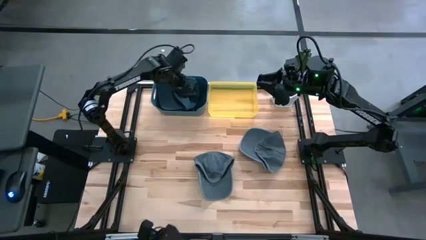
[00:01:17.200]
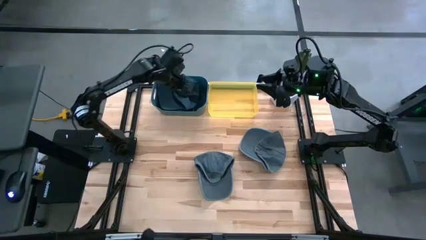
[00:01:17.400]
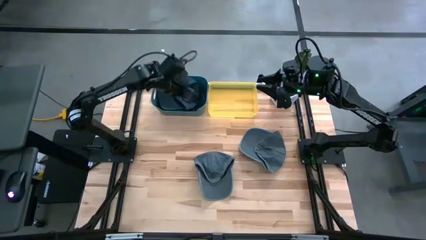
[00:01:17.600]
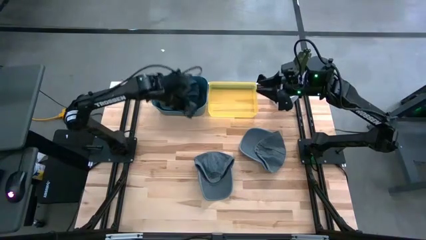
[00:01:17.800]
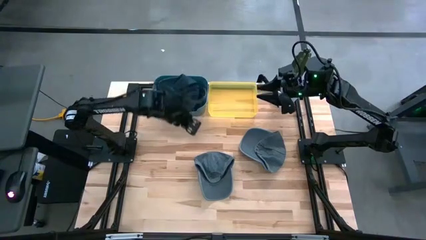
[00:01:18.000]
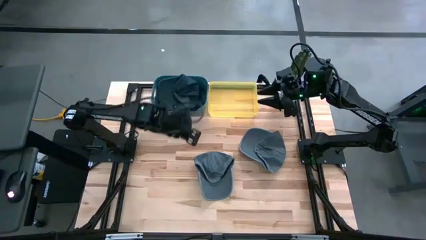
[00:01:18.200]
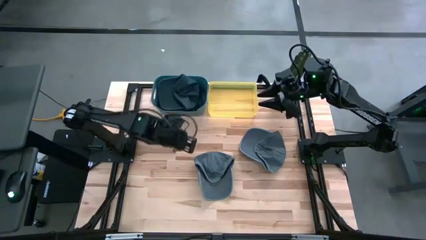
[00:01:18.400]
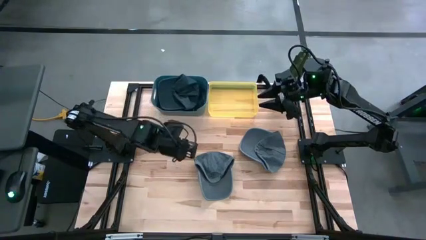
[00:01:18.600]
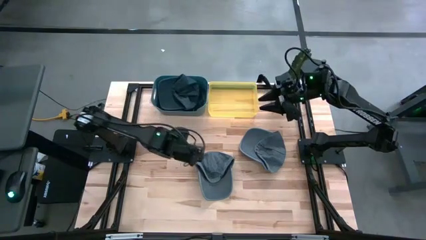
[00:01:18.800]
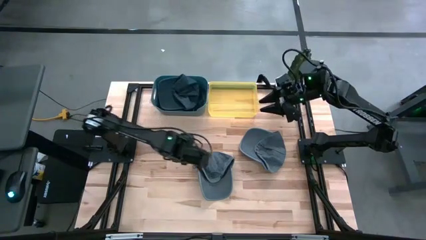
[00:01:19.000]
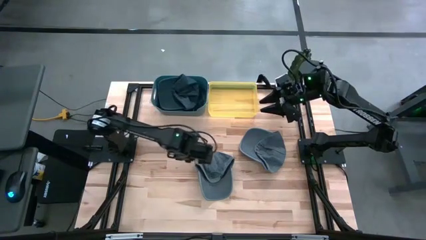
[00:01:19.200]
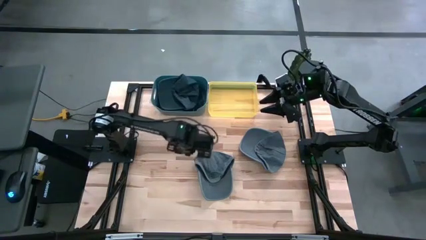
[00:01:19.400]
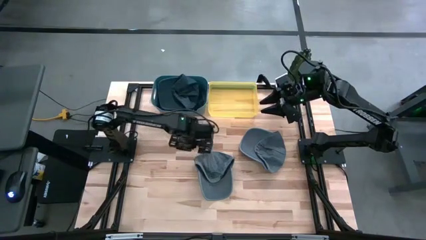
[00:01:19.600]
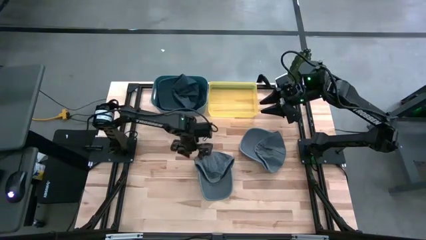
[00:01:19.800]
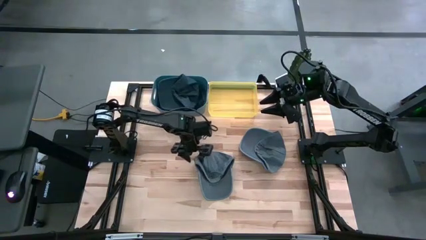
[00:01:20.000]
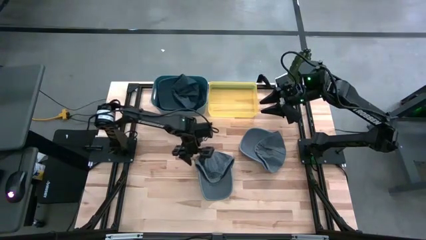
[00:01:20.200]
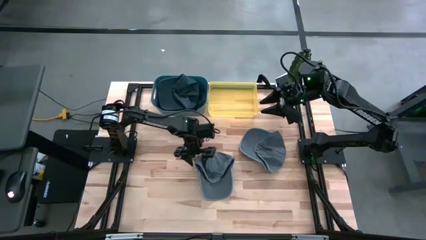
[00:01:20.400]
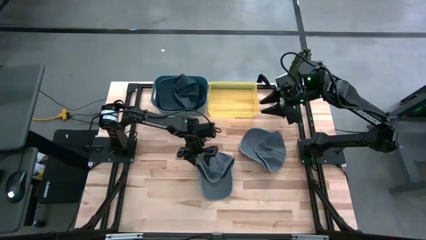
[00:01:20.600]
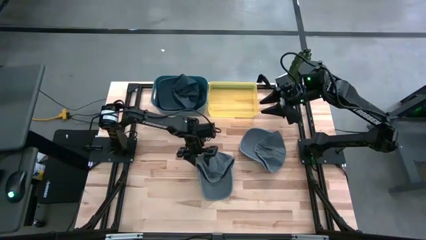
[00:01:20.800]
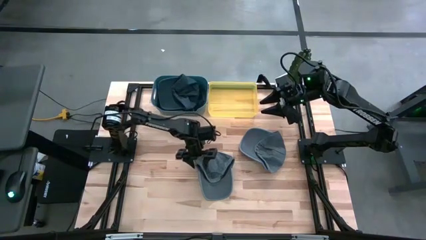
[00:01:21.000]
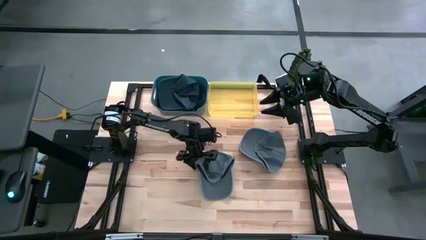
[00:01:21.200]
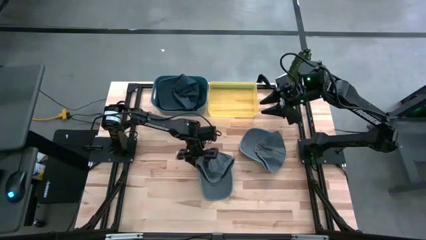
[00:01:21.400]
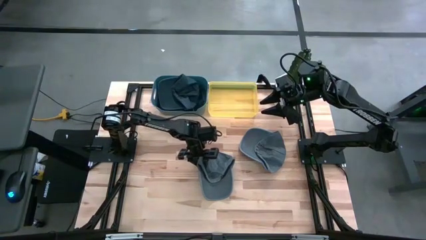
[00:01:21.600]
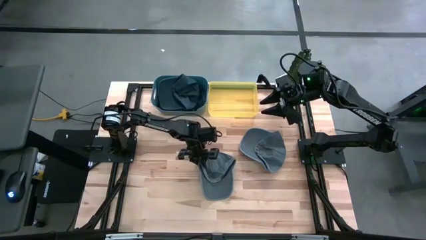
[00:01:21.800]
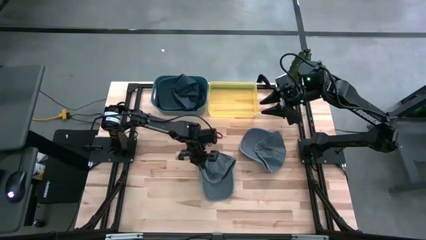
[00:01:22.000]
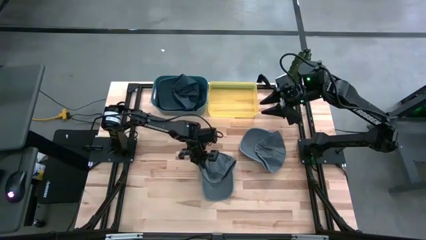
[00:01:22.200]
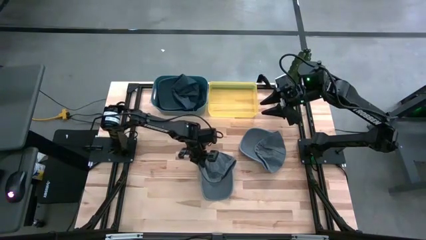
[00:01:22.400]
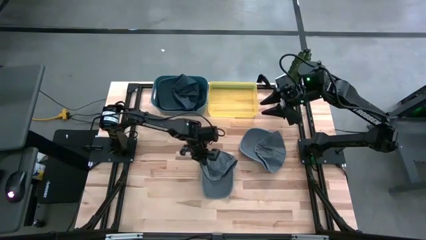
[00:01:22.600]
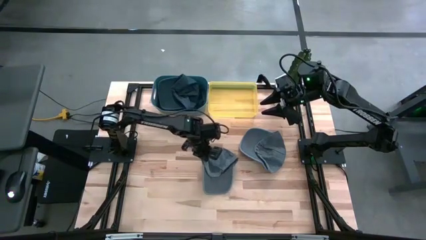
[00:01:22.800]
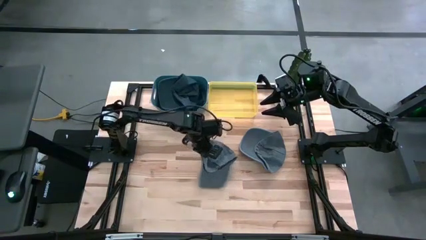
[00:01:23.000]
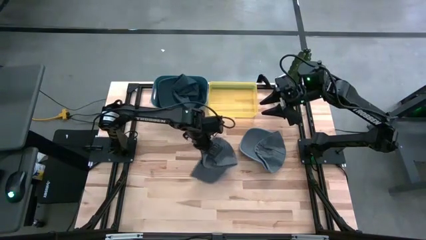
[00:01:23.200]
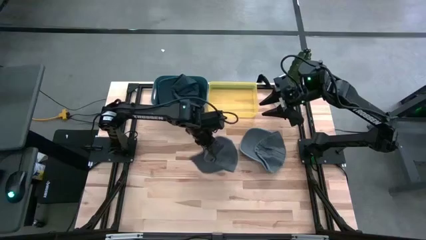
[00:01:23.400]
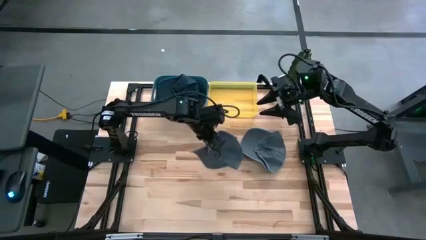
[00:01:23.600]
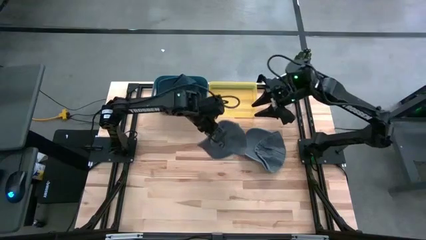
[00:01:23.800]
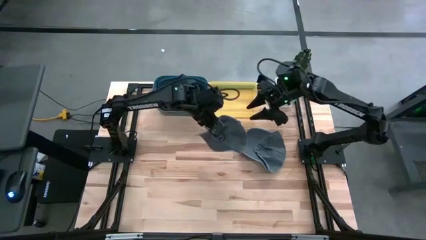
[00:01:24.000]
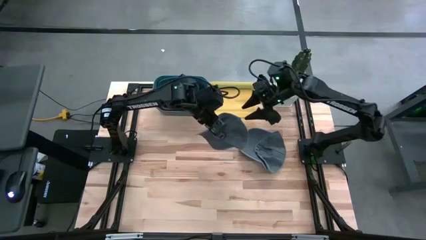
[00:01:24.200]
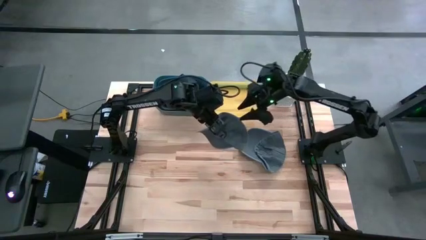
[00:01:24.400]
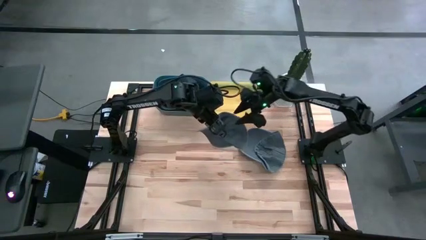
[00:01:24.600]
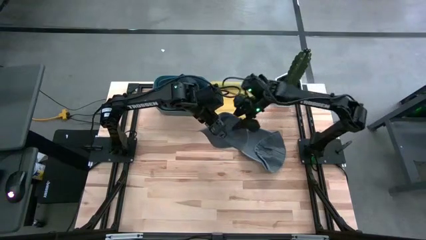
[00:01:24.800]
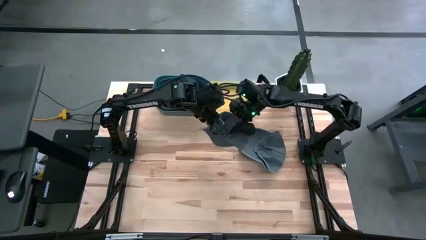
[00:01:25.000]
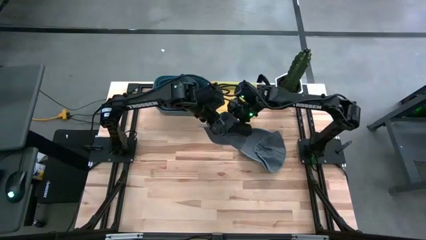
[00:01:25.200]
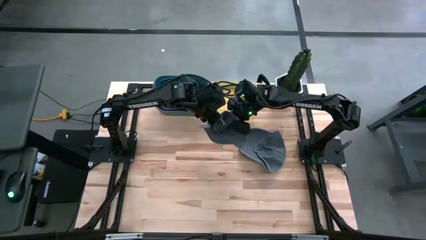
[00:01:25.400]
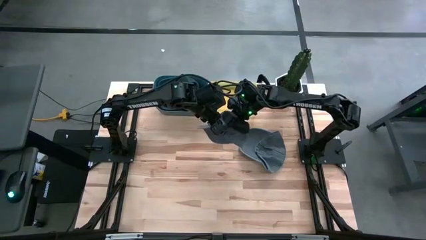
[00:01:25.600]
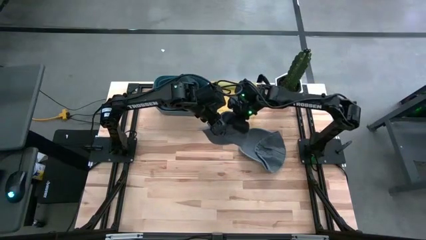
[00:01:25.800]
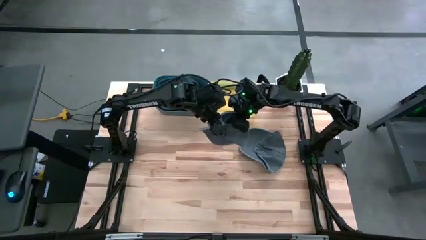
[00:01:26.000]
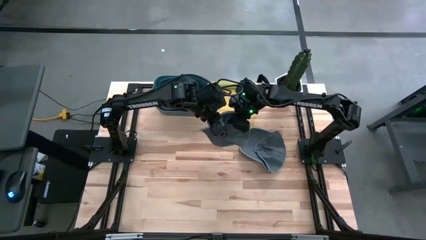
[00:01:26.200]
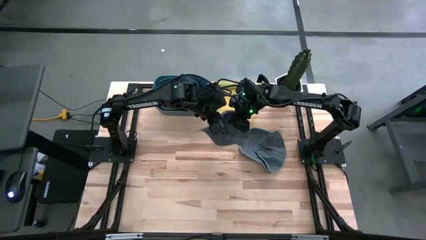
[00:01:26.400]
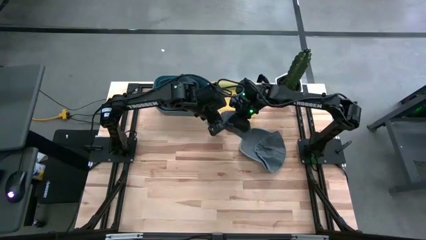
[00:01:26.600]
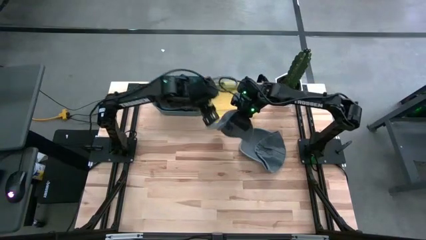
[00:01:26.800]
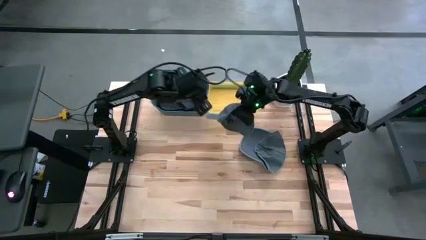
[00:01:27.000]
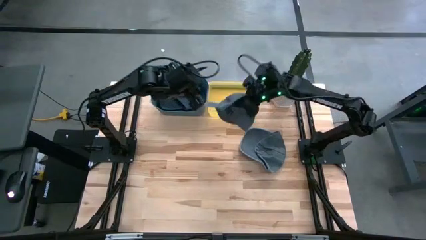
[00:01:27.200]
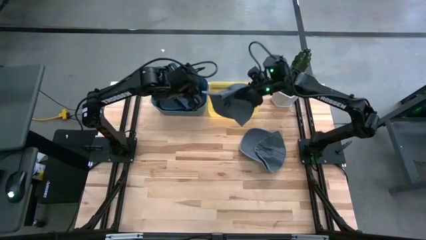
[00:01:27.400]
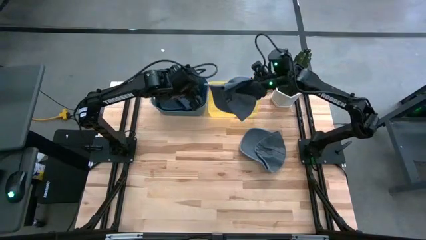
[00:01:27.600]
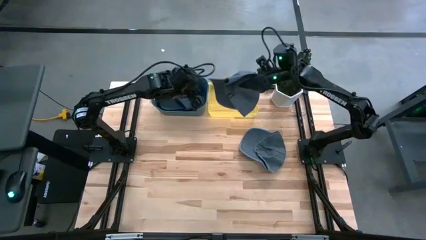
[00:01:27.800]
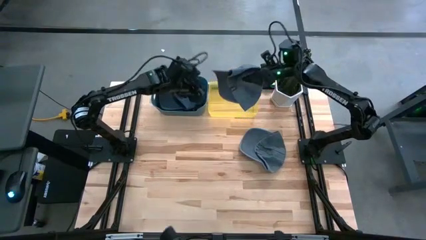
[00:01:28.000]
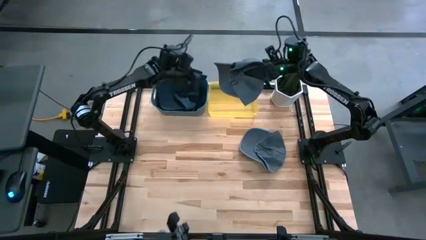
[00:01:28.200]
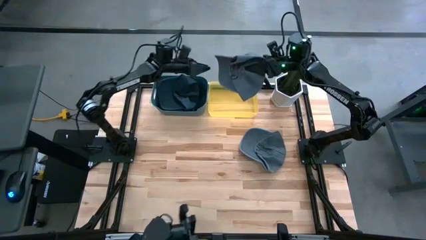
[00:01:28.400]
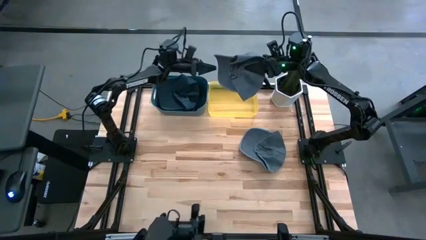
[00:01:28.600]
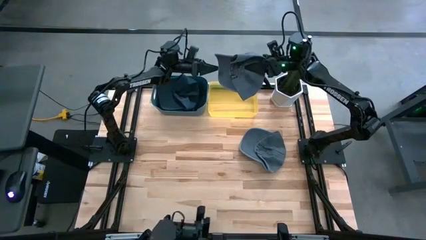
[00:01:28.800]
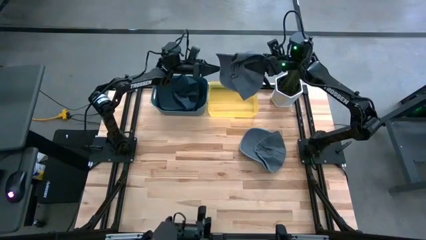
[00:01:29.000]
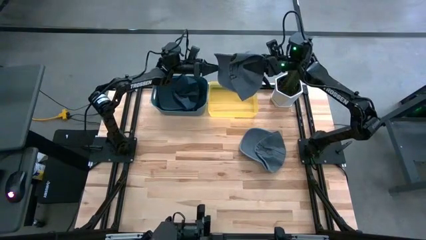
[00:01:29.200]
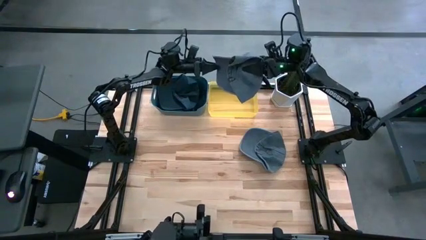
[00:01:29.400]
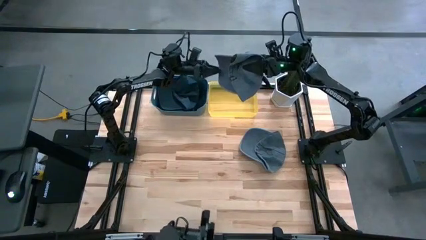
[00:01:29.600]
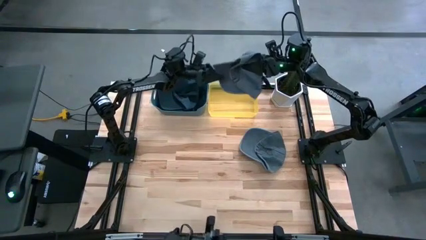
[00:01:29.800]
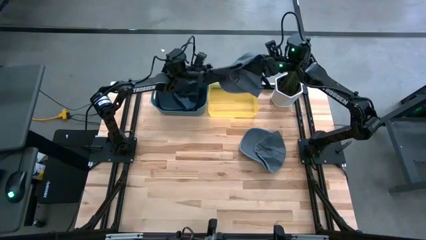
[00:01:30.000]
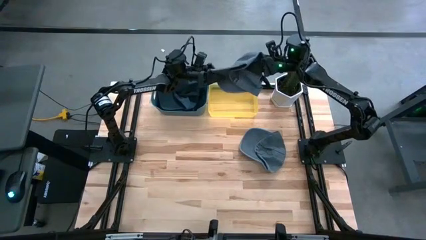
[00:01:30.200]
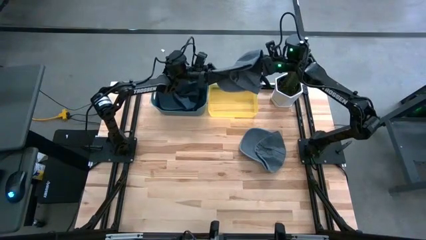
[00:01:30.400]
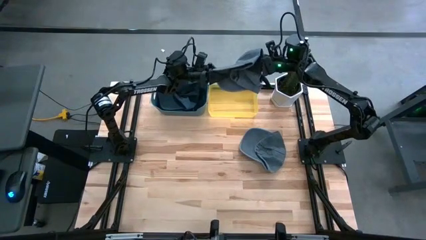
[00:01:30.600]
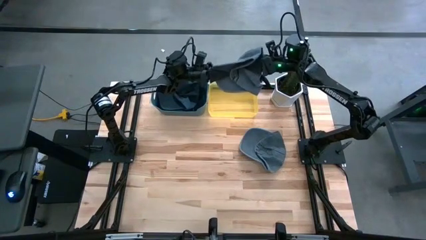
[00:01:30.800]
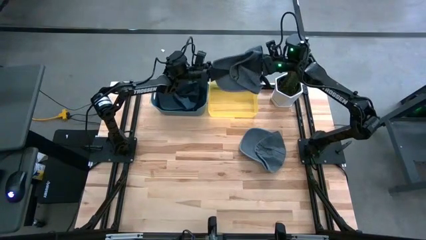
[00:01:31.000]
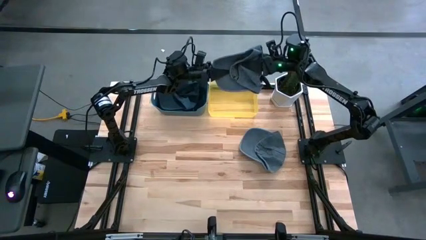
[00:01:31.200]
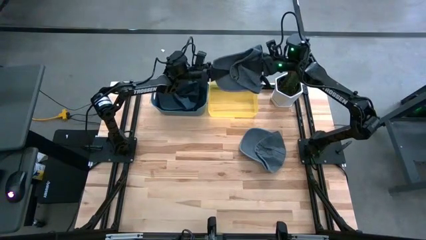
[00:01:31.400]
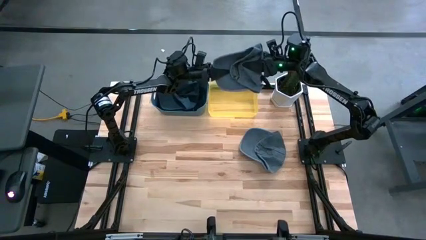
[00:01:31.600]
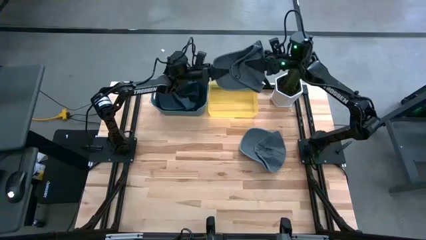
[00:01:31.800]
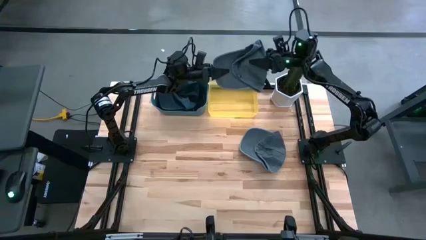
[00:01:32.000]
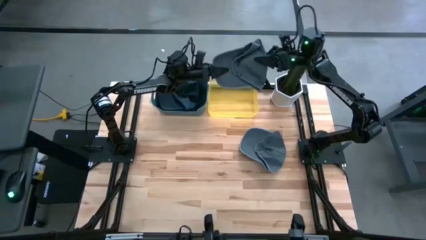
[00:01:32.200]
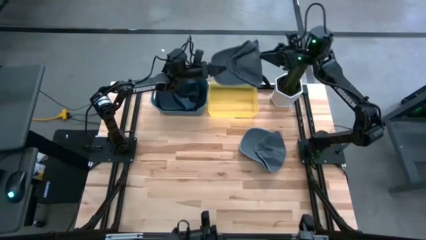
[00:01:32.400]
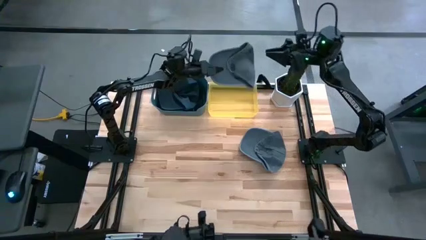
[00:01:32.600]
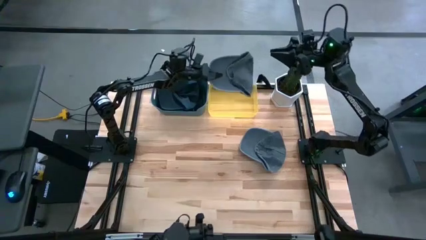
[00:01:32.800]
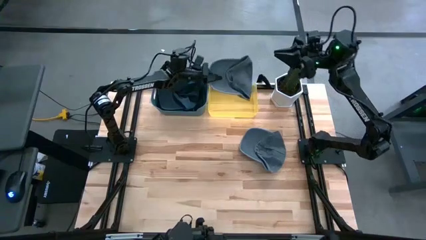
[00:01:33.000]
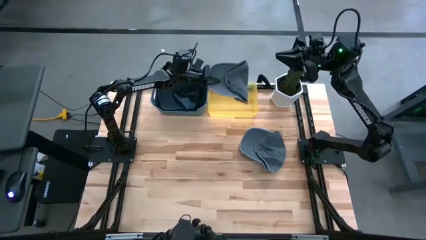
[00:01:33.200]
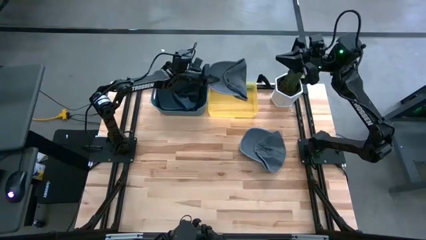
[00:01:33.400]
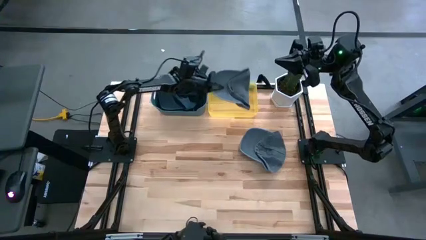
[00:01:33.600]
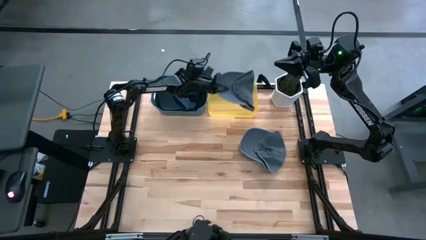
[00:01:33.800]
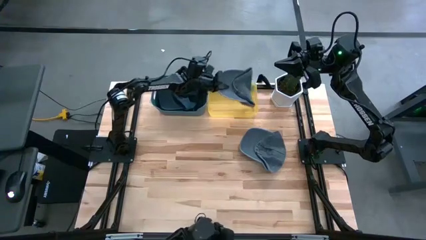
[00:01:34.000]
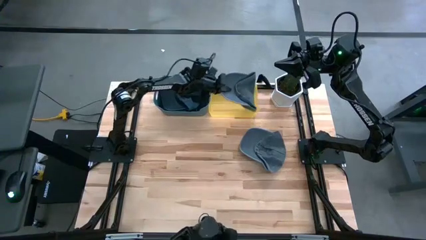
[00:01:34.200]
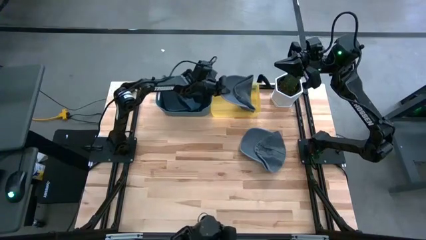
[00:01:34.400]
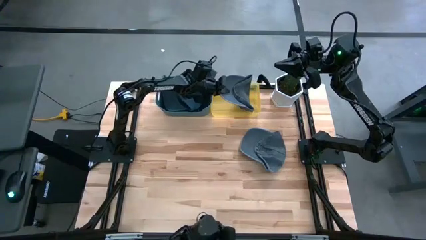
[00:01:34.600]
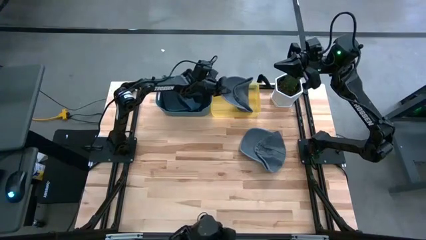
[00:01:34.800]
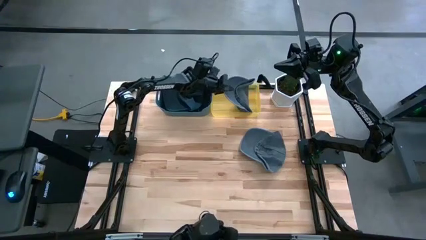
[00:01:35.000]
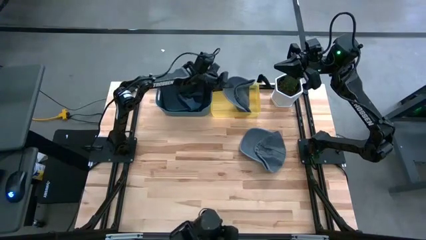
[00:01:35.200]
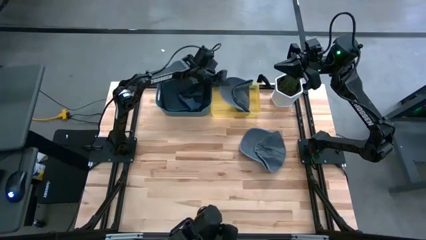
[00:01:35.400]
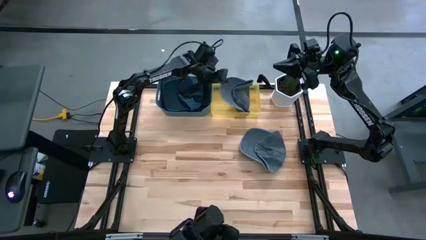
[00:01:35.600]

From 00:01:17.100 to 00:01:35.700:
Task: Pick & Place hat
Put the left gray cap into the yellow bin
